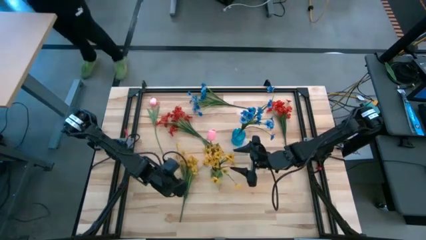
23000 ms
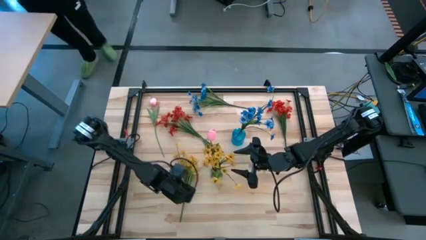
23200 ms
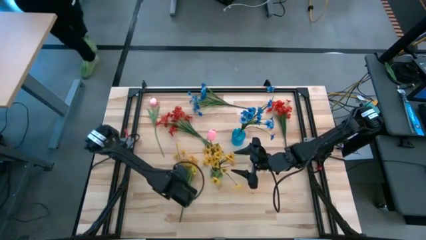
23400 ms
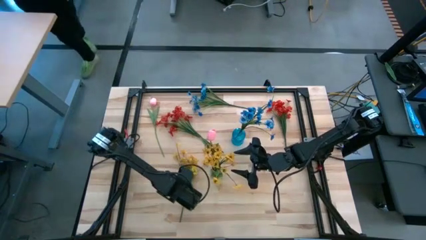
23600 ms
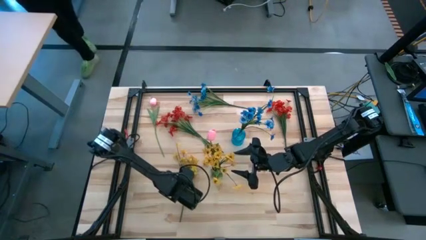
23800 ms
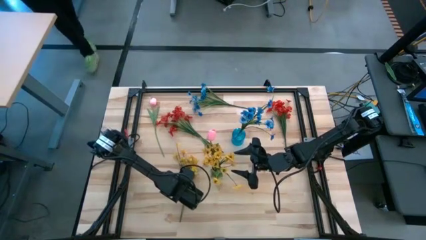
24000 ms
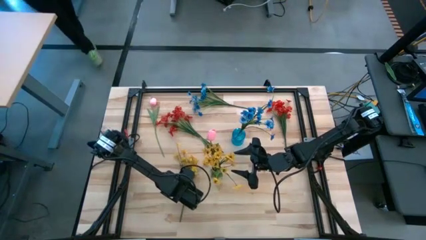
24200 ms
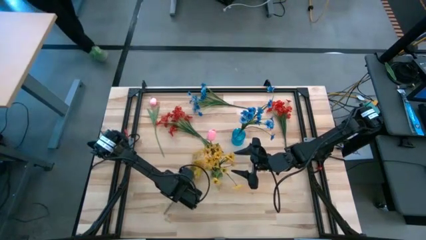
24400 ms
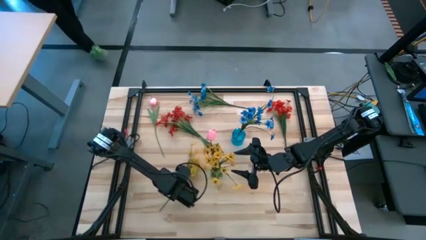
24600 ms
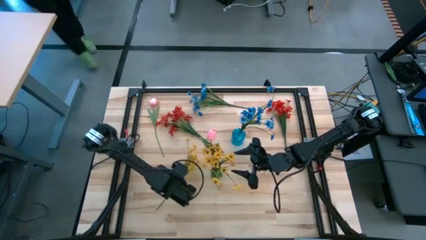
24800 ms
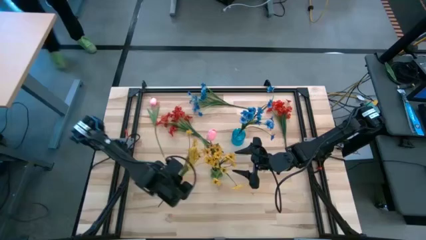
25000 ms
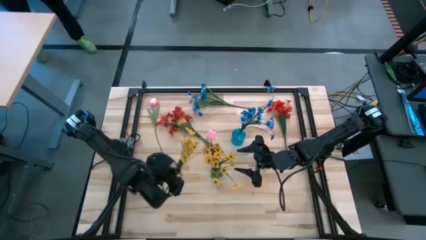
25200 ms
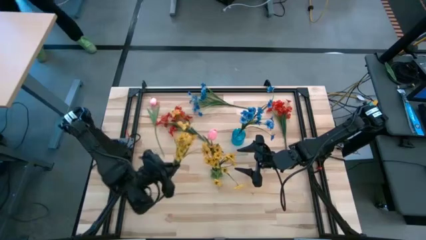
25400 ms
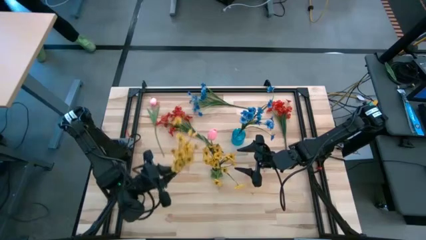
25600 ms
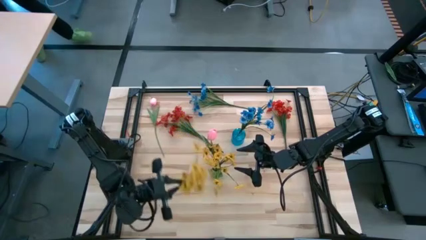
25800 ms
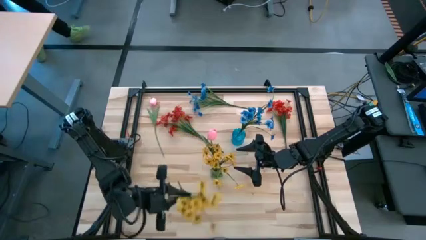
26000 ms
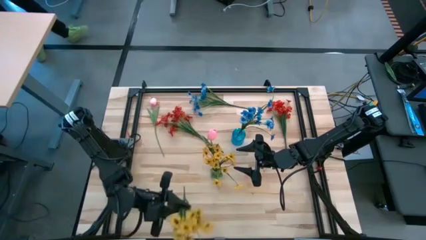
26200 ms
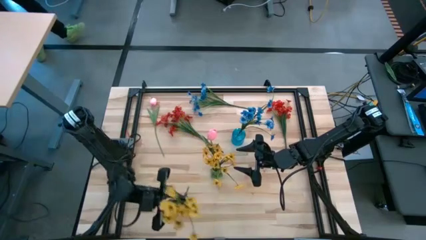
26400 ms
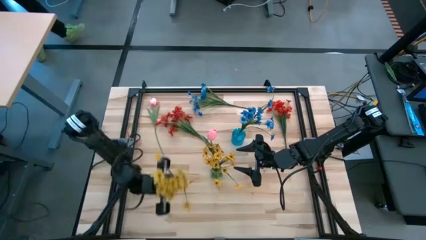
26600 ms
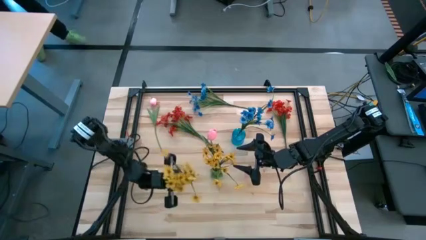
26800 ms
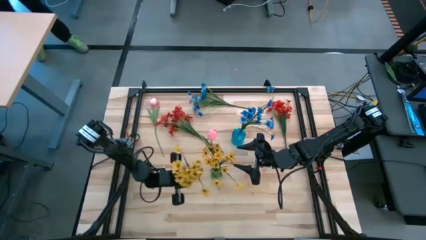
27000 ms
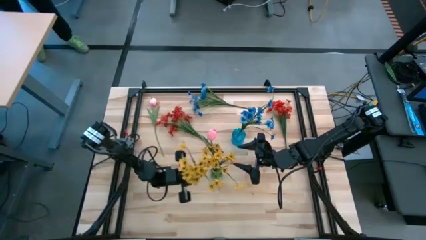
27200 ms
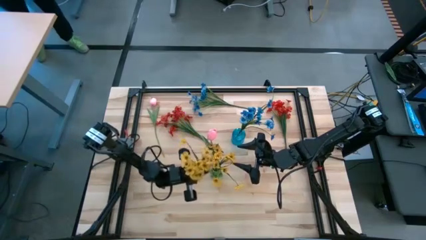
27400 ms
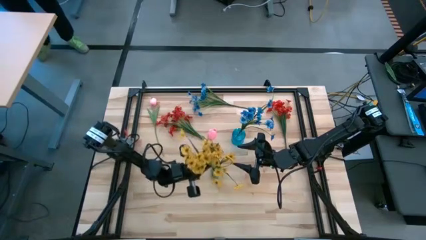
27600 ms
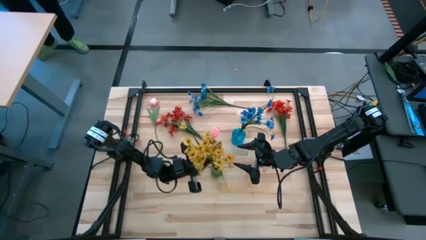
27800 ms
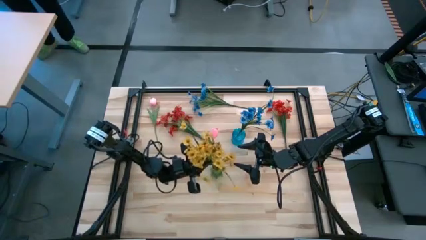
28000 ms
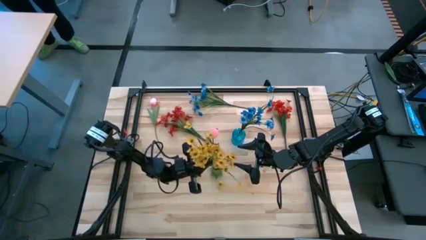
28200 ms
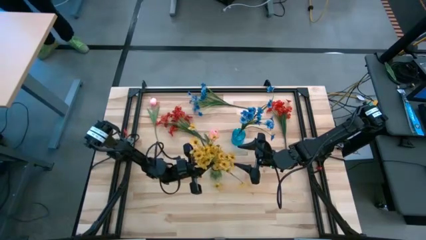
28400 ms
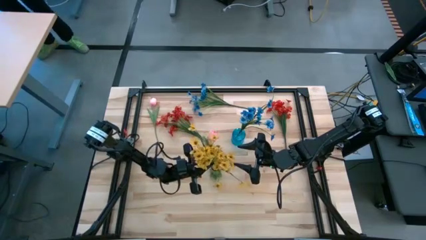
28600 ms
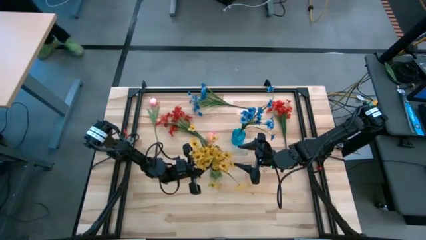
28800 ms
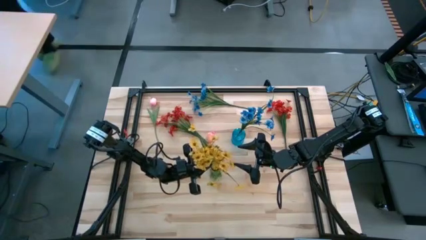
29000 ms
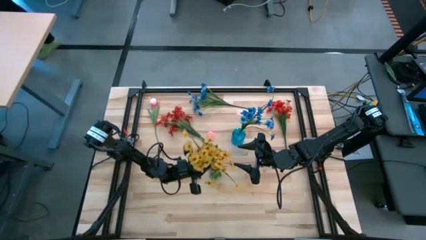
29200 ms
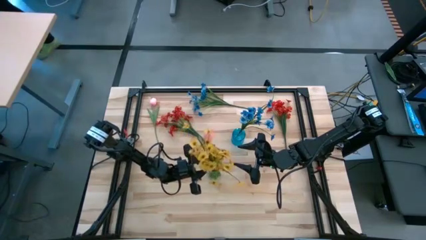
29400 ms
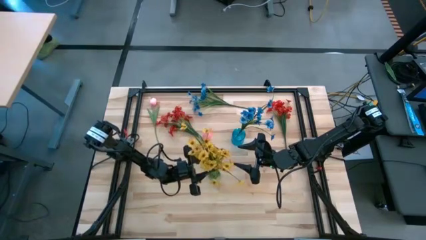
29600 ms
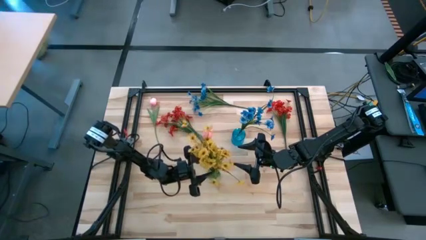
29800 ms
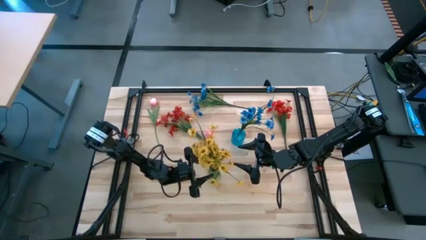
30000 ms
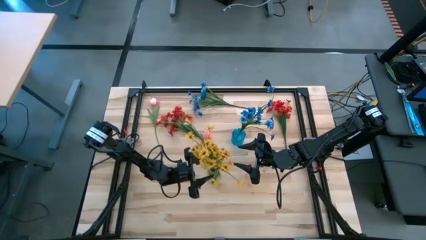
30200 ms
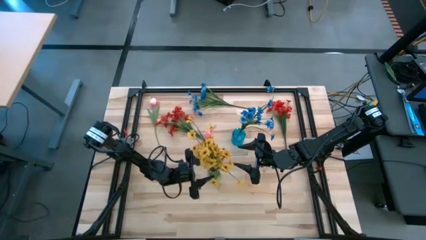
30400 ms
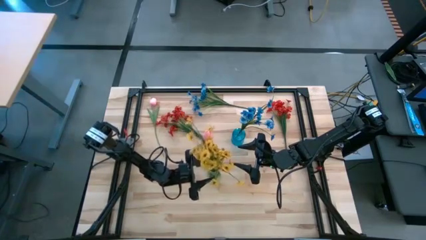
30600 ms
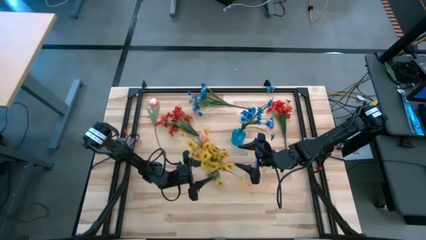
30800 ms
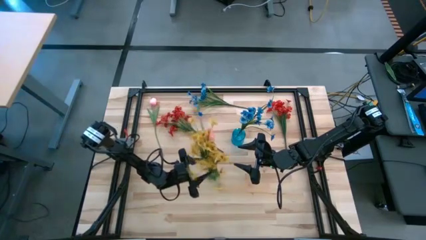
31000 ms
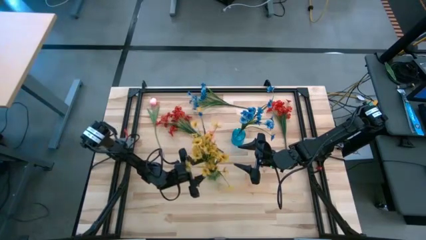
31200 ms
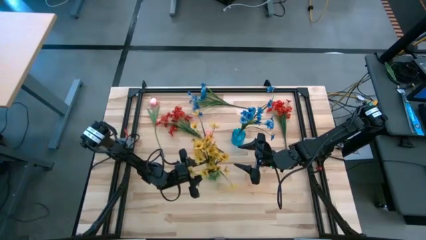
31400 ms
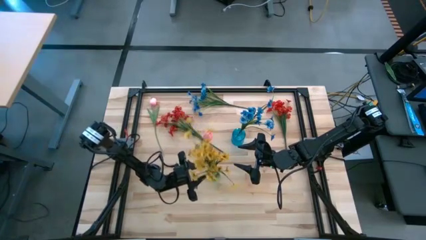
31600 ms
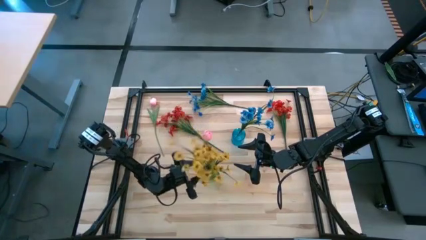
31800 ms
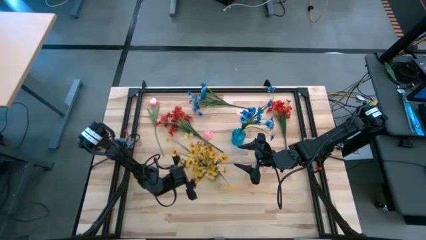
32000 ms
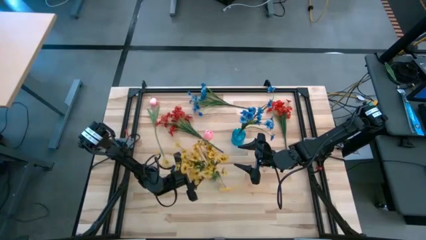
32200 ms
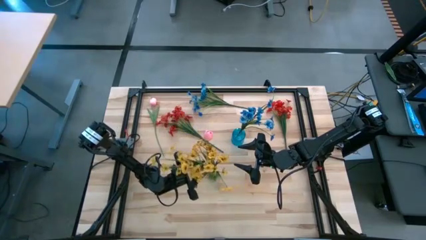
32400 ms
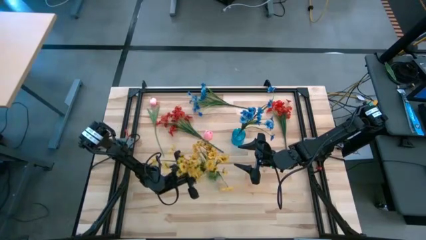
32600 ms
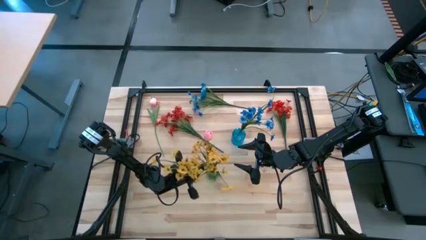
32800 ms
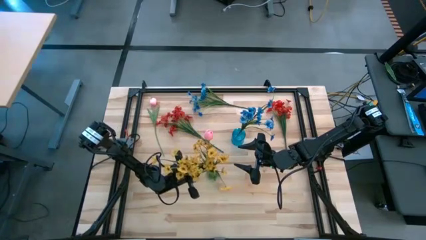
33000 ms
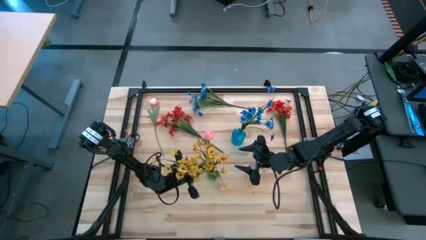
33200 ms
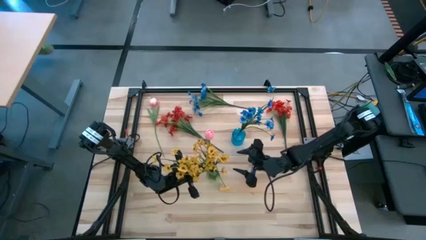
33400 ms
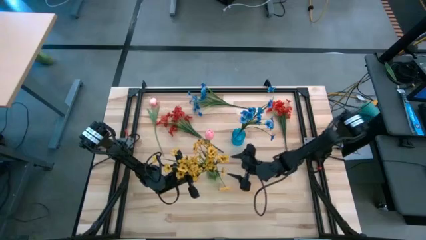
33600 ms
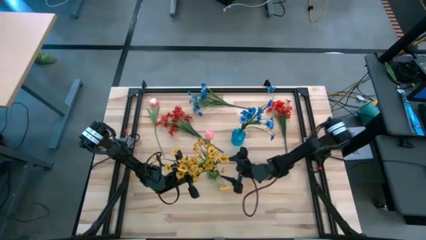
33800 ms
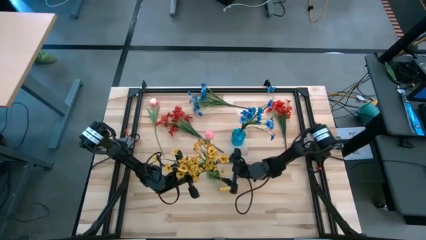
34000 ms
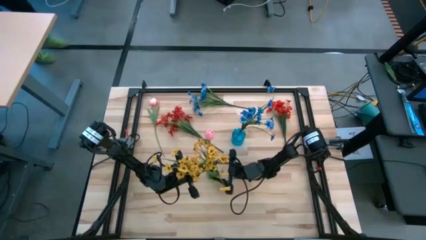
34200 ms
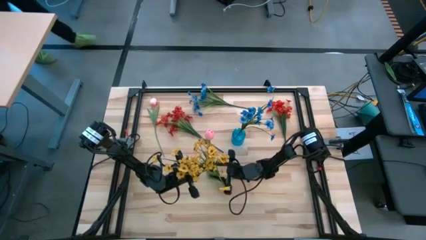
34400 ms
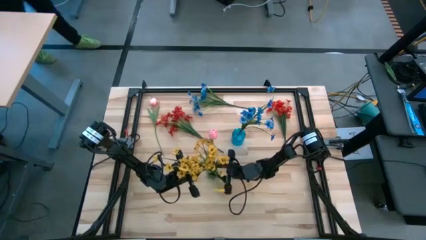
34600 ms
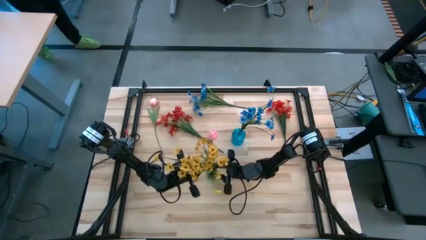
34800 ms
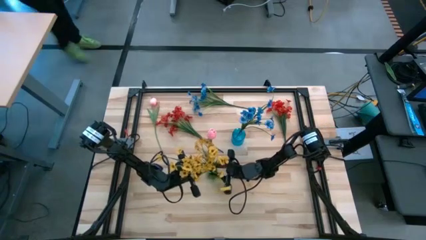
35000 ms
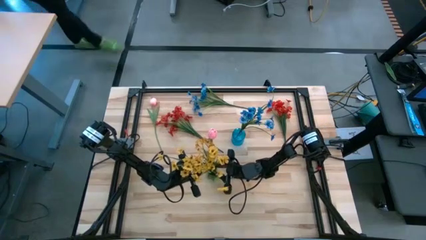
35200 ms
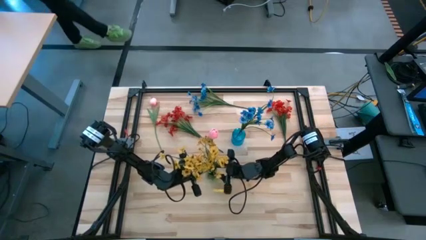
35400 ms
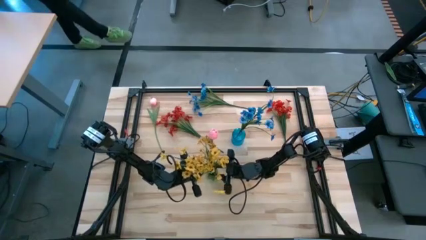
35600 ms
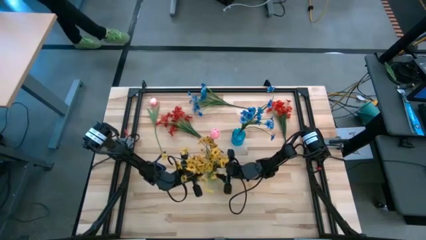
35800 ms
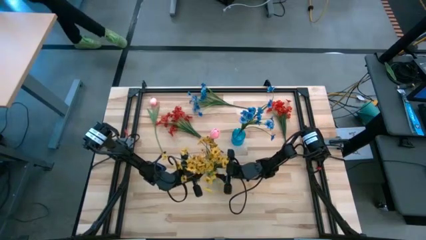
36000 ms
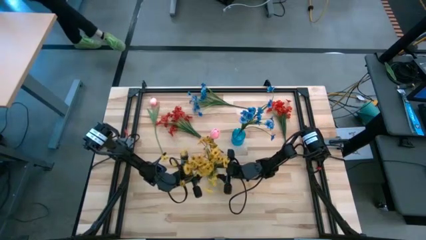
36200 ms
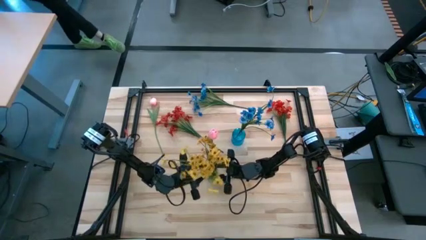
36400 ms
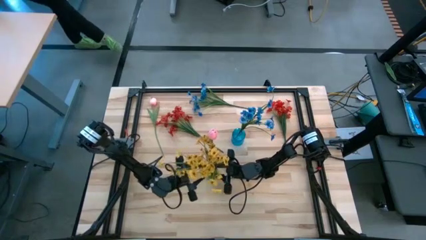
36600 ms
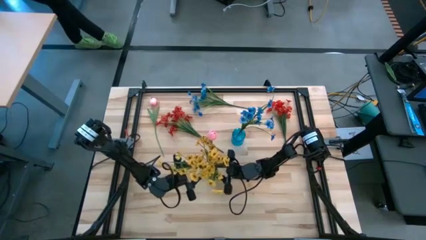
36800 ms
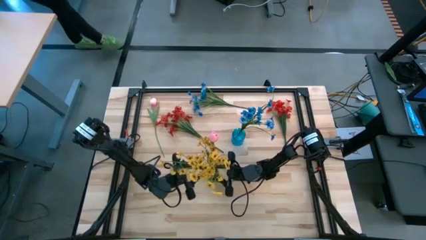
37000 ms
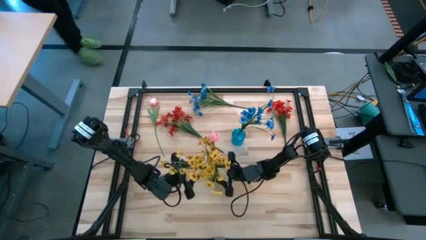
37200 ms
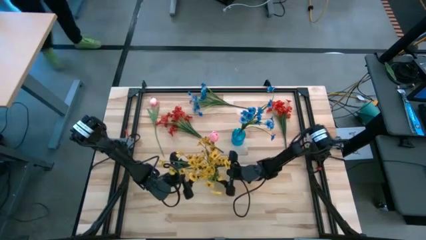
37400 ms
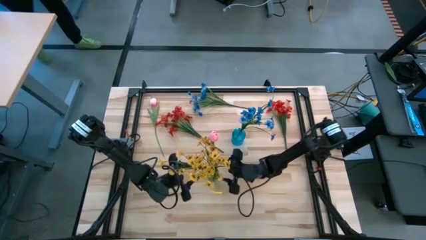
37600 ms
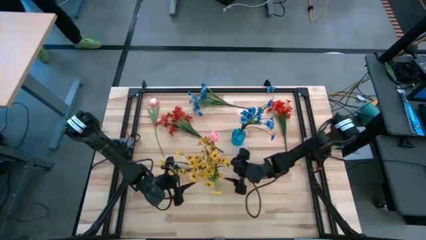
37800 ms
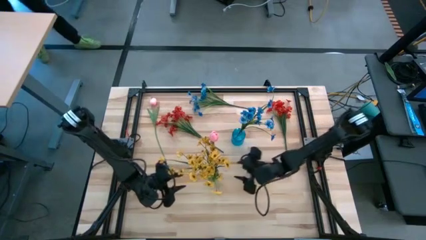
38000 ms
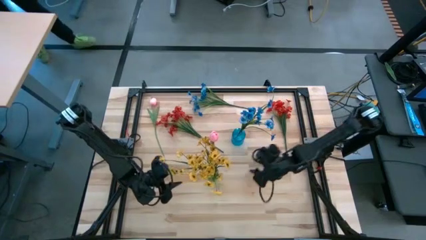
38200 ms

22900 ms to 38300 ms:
Task: Sort flowers into vase by color
Put the yellow flowers into the green flower vase

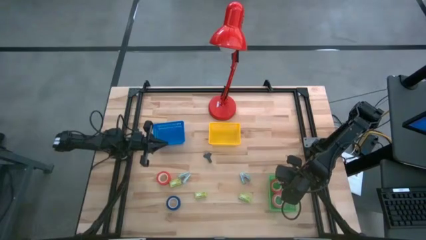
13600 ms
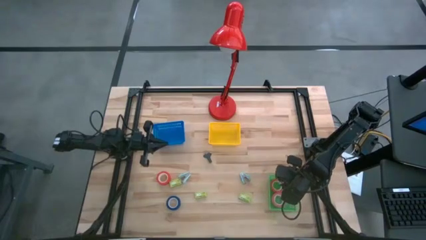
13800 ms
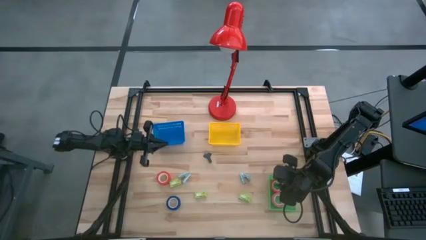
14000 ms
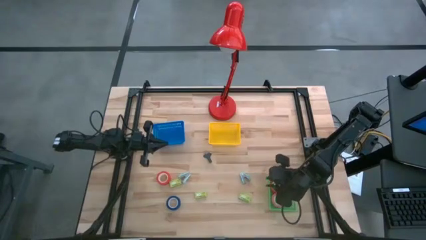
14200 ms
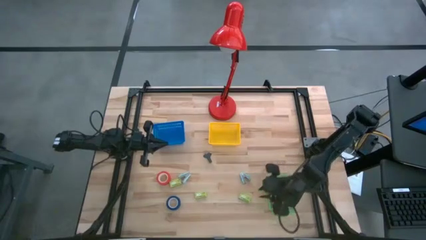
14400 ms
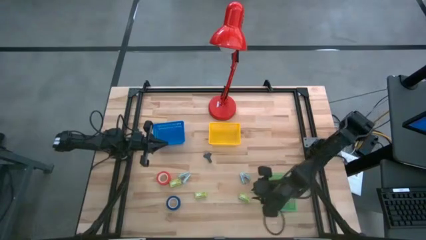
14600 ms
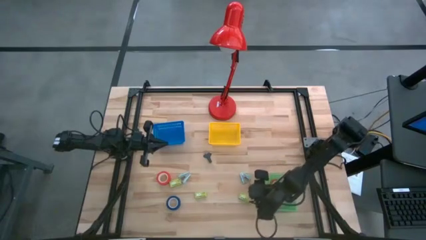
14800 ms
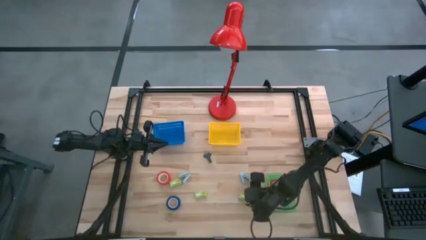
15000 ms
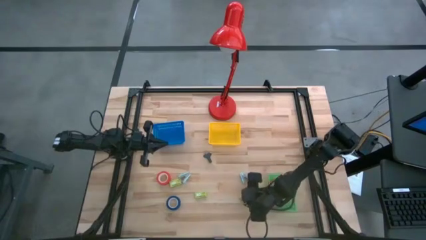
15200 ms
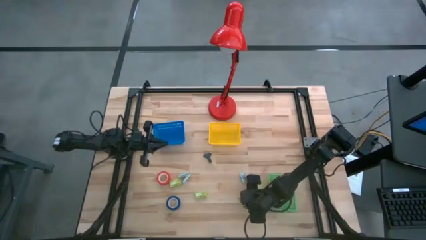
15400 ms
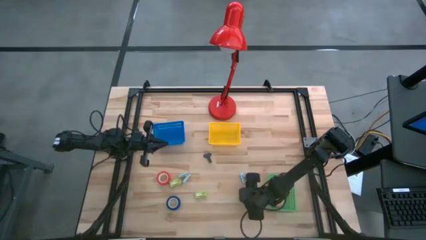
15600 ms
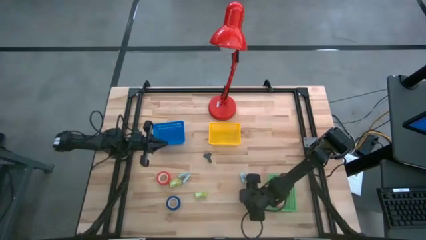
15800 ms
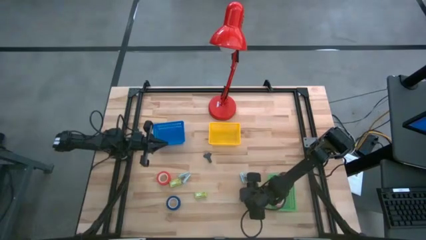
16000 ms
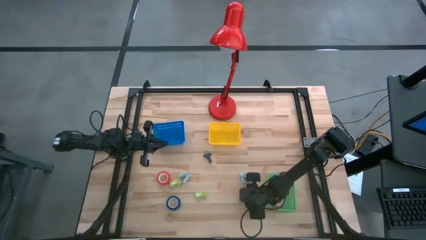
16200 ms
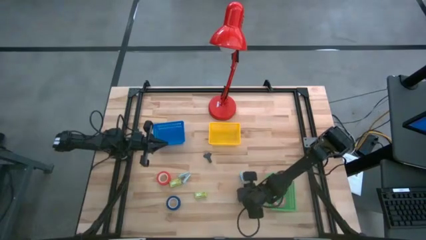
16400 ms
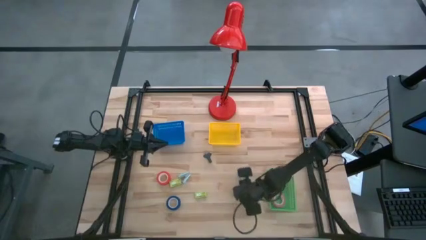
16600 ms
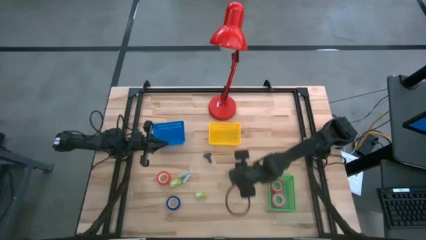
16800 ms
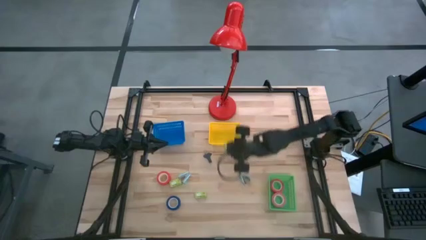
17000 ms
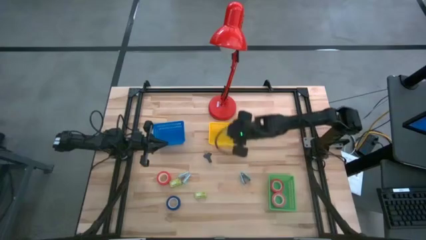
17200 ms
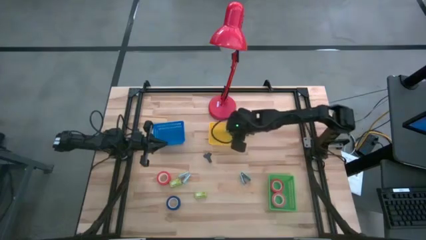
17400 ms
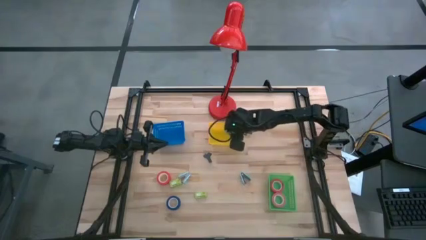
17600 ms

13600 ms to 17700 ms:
Task: Pick and place Stapler, Stapler remover, tape
Put the right green stapler box into the yellow bin
